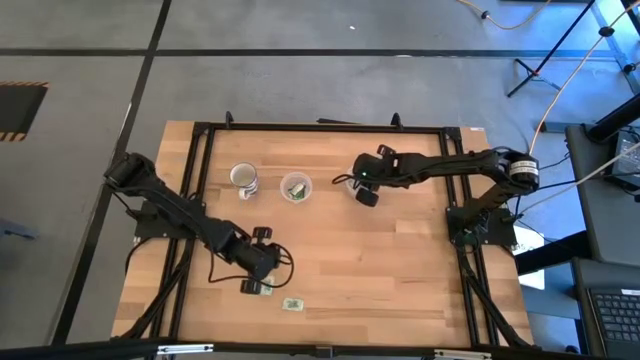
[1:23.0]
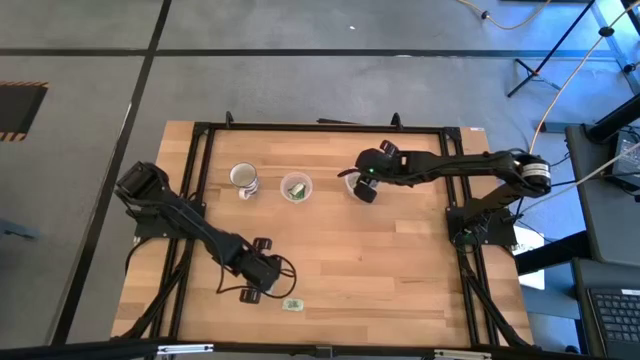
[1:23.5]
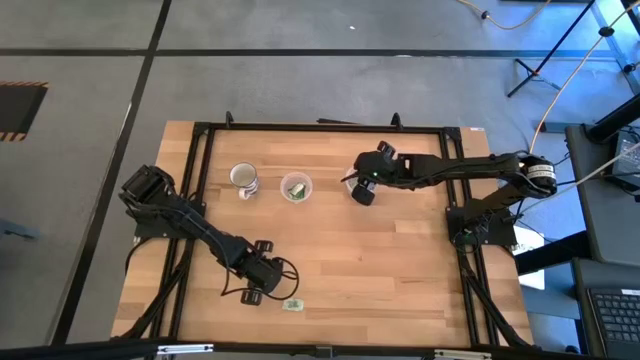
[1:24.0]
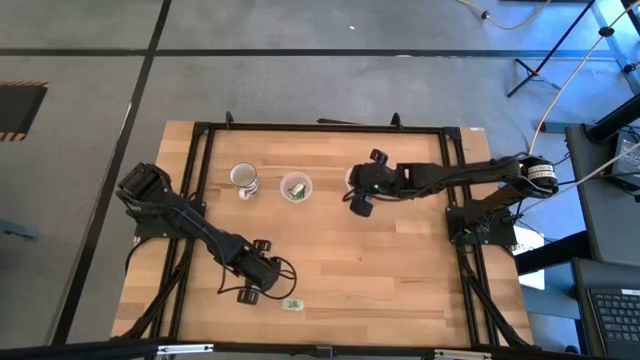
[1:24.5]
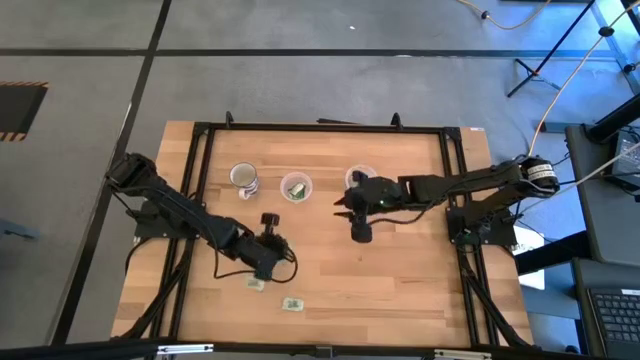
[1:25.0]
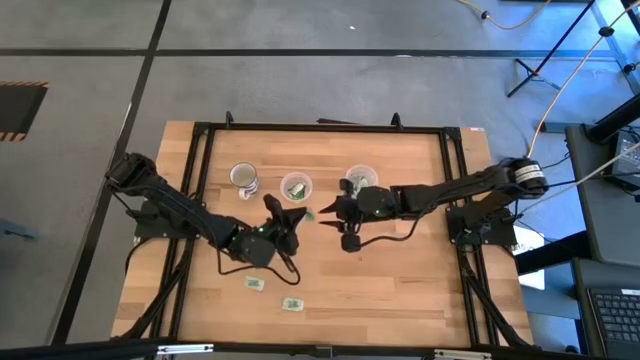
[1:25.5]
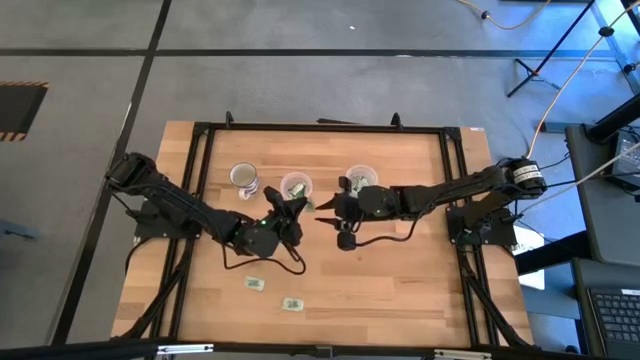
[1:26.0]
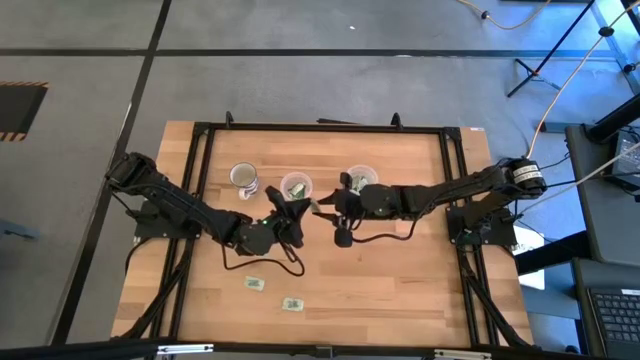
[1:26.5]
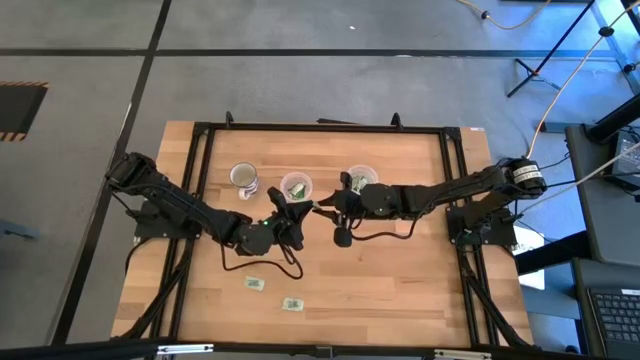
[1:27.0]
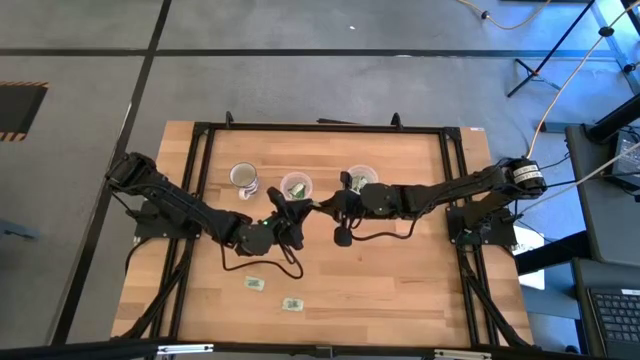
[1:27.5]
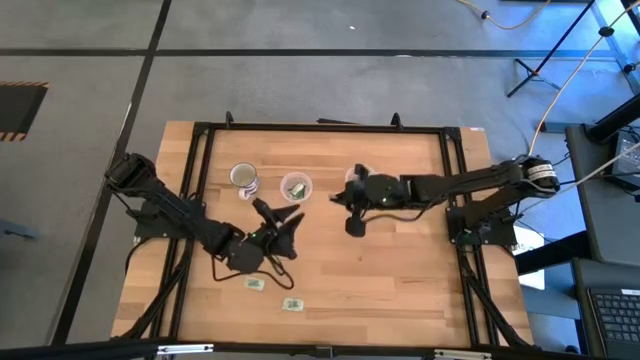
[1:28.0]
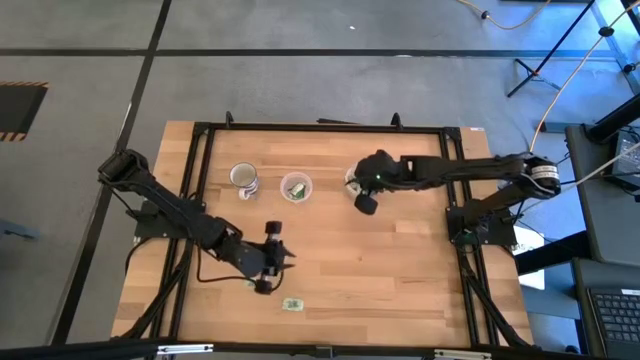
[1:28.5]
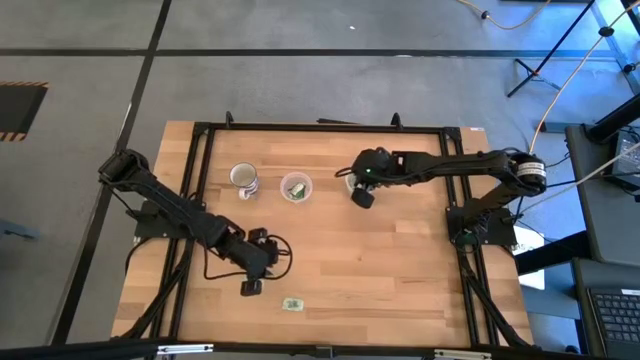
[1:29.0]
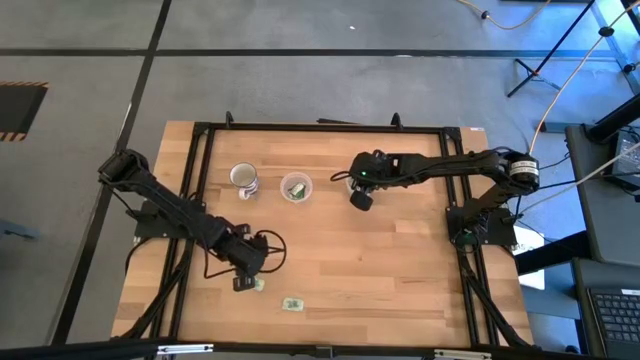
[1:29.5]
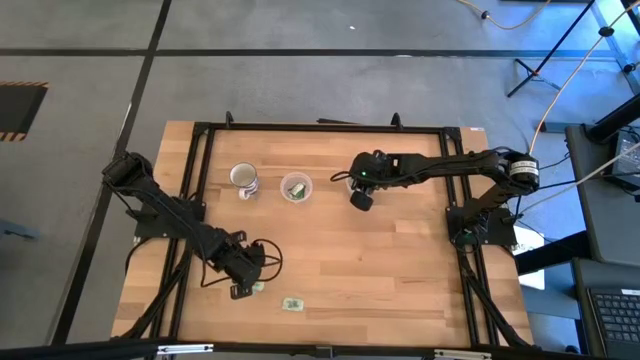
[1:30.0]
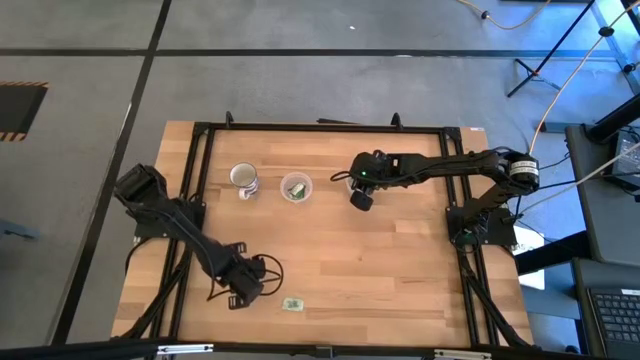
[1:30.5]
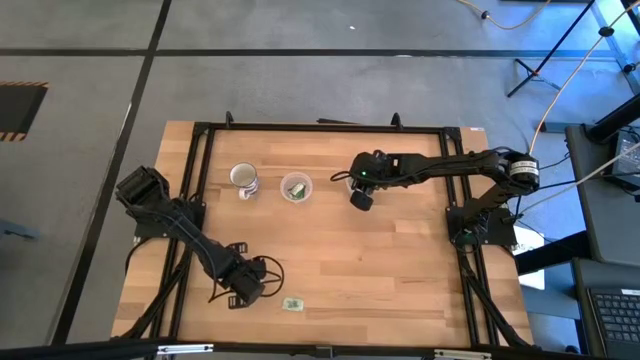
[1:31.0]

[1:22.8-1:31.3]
Task: Pick and place items into bin
Put the white stevia packet into the right transparent bin

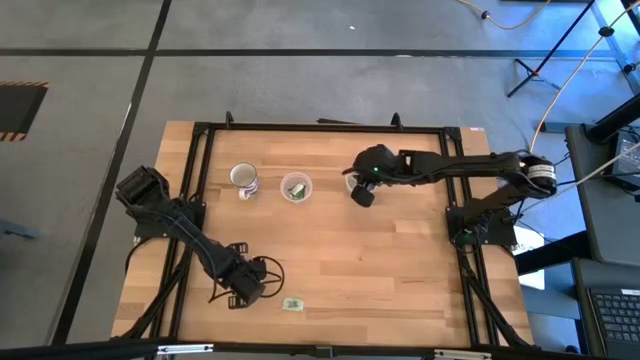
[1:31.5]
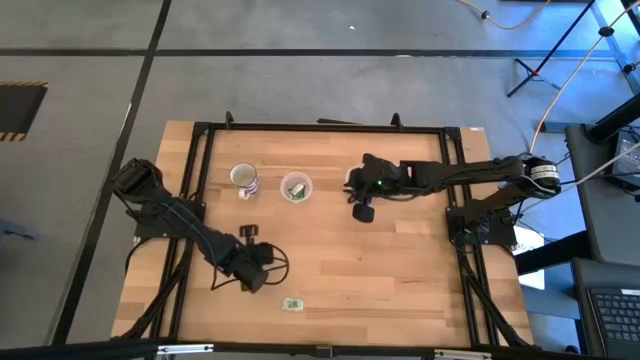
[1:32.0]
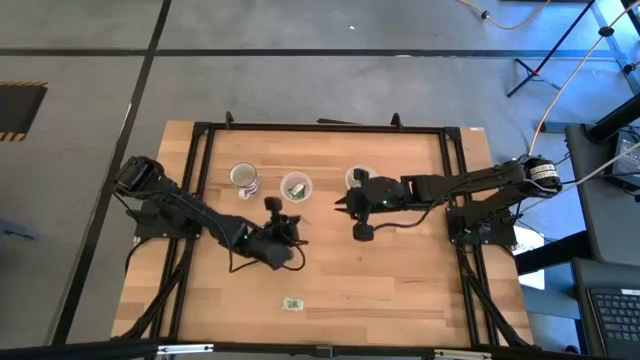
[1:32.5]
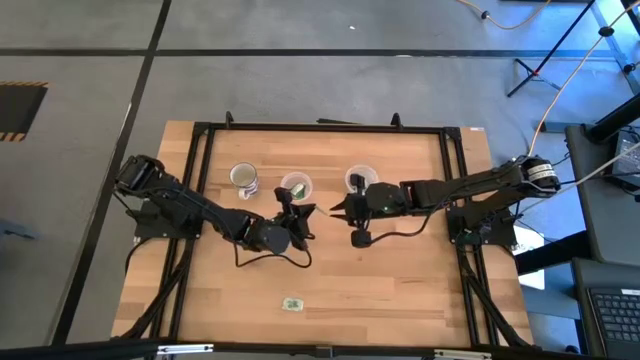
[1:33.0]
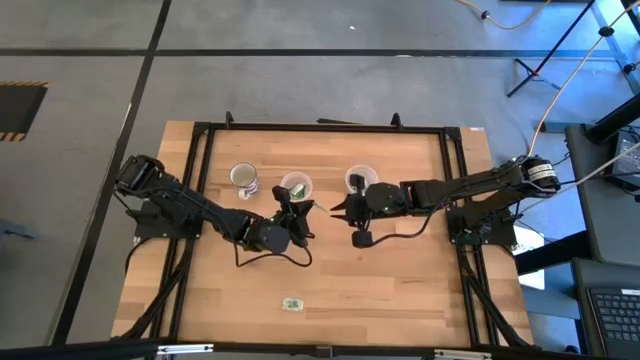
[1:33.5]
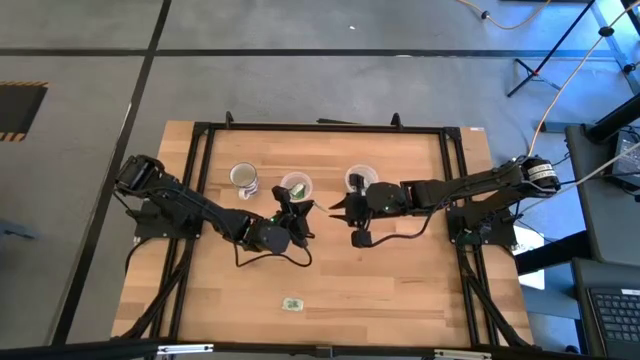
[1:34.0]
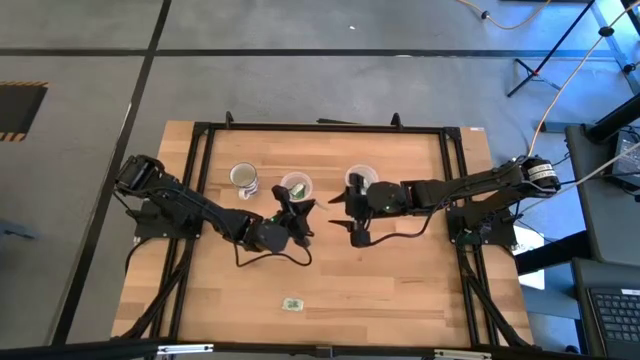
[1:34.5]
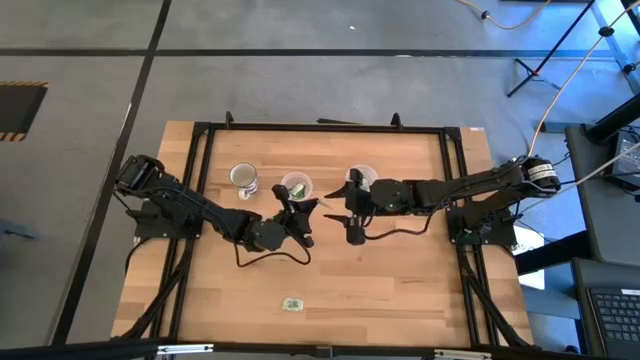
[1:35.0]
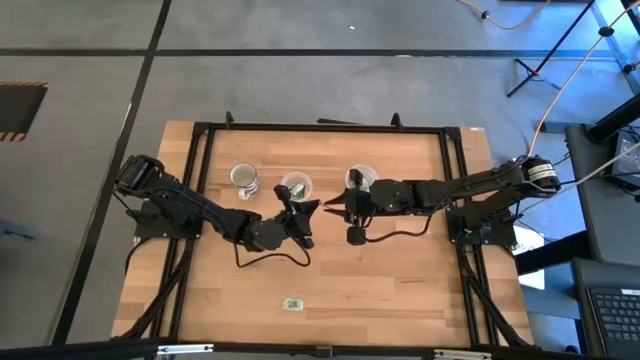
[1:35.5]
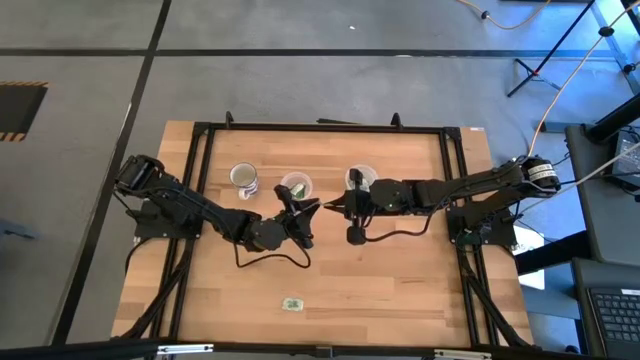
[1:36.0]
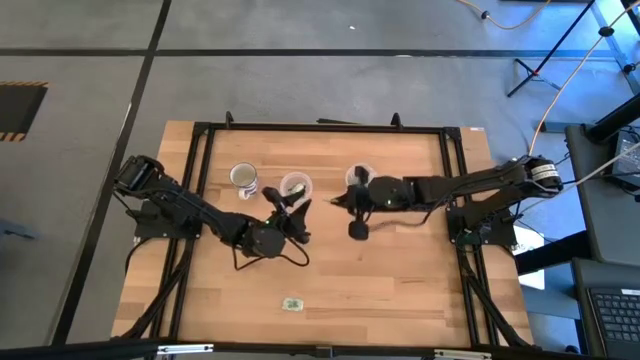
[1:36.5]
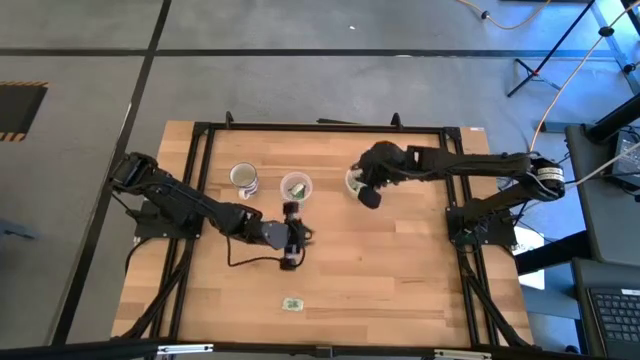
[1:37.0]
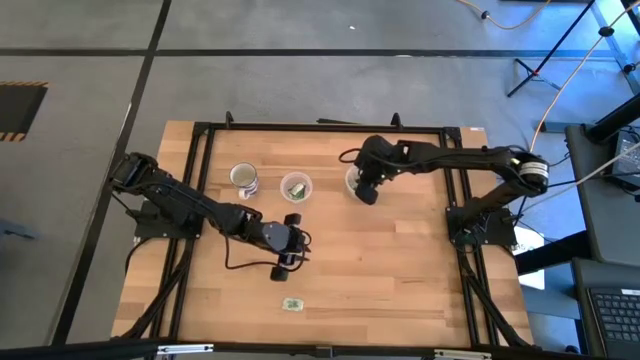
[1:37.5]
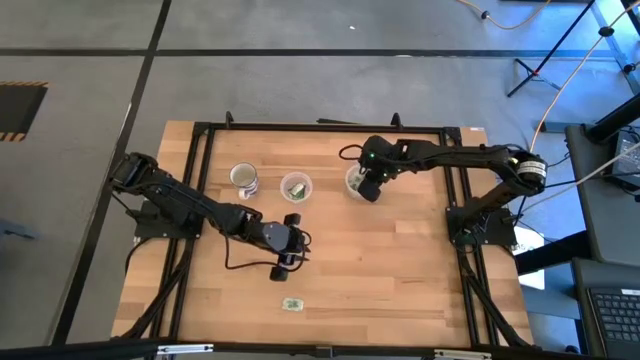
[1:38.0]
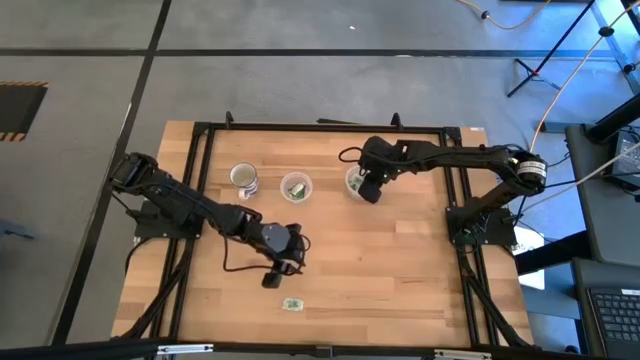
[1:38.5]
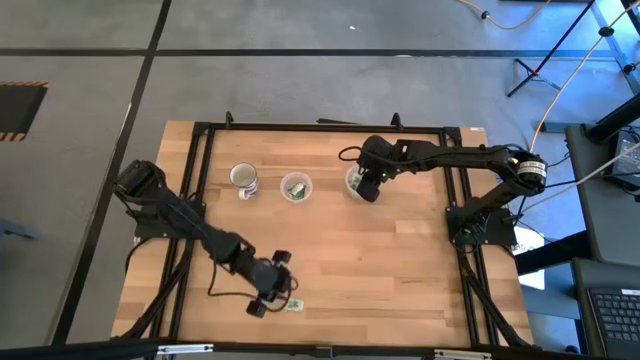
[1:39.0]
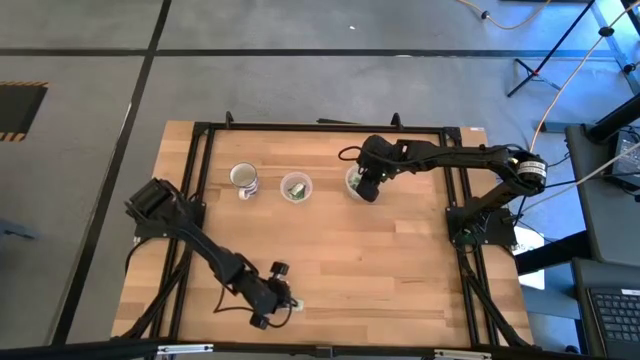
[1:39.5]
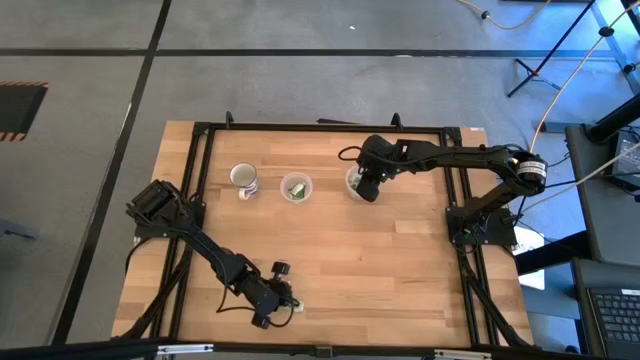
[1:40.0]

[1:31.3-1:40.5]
Put the white stevia packet into the right transparent bin

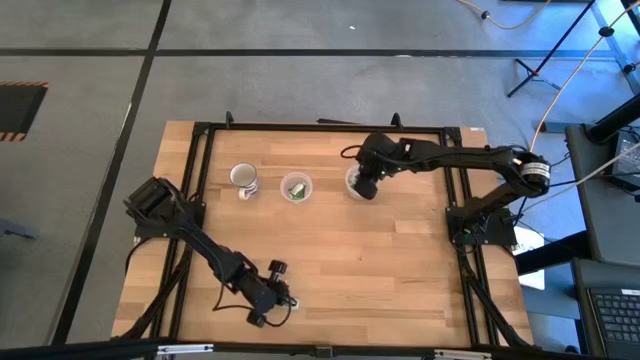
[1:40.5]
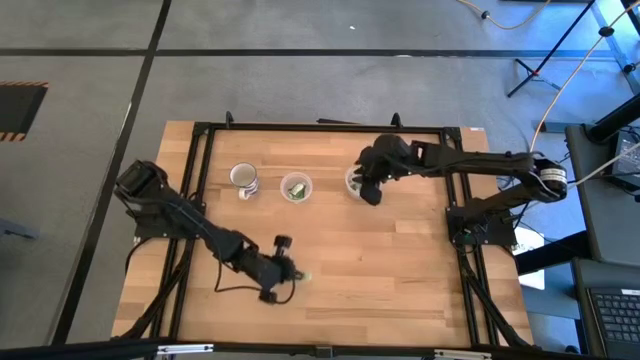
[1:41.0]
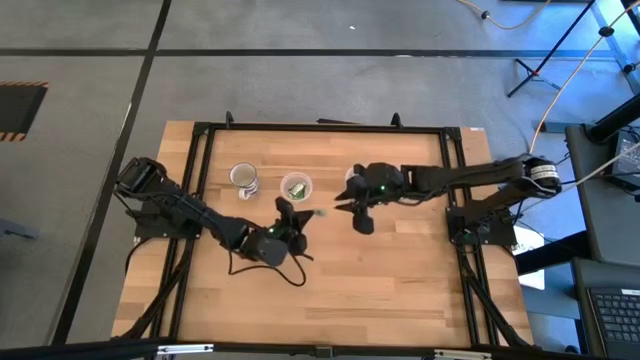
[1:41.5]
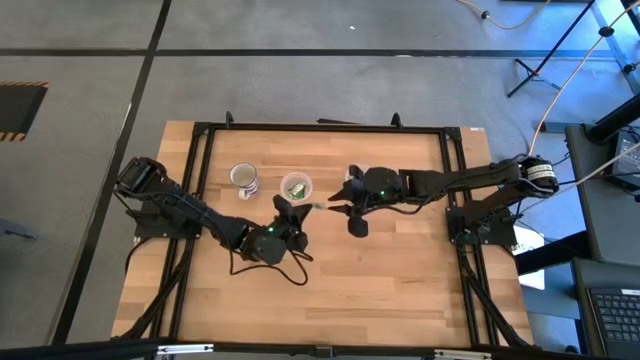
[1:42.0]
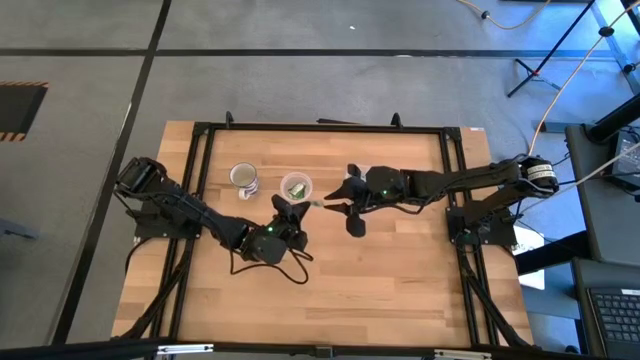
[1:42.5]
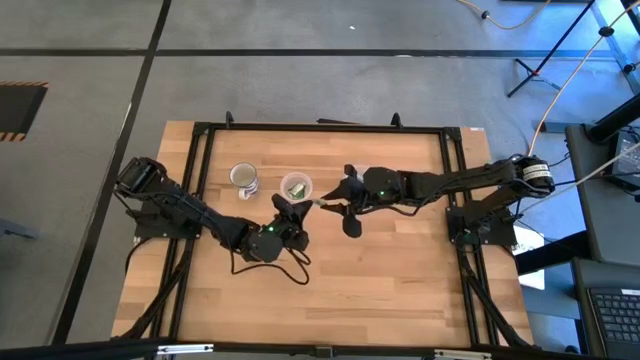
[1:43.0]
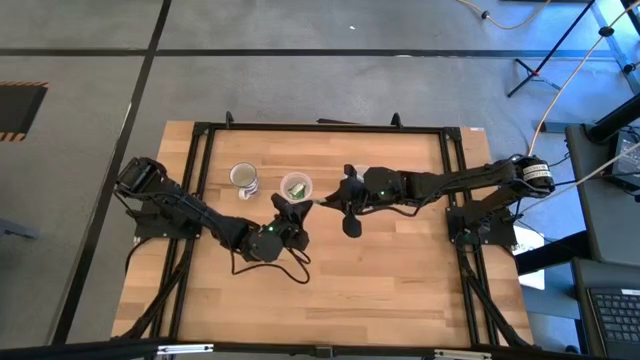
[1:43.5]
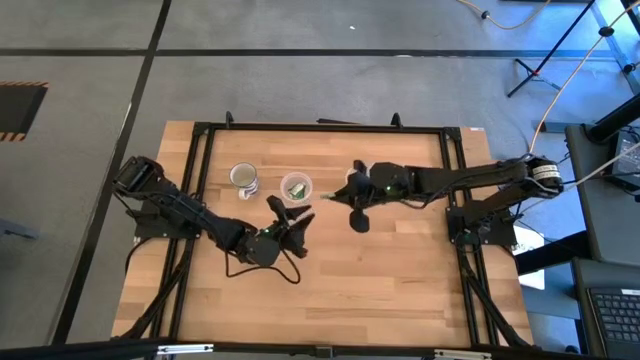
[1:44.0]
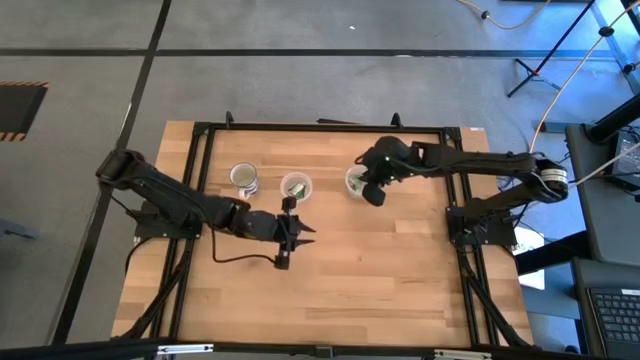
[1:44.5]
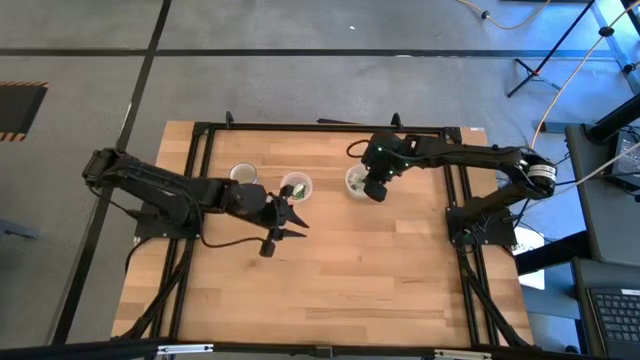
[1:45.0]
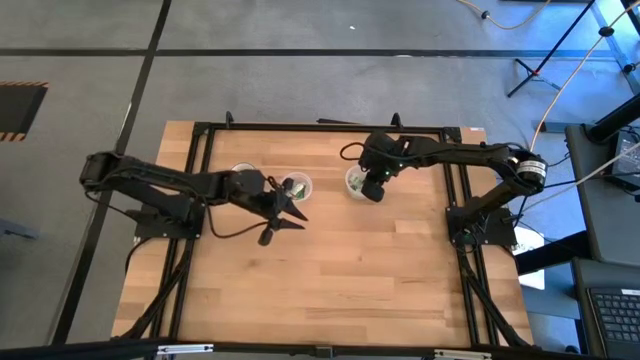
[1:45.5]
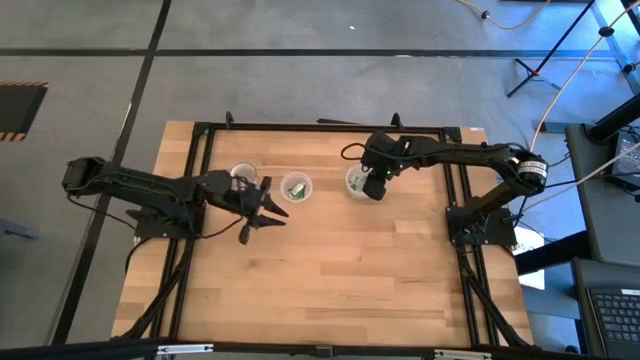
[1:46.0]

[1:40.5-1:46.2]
Put the white stevia packet into the right transparent bin
